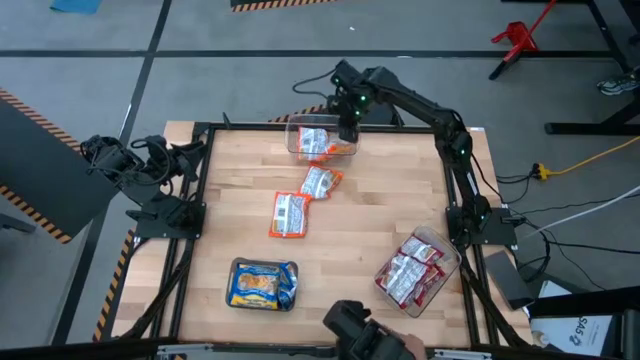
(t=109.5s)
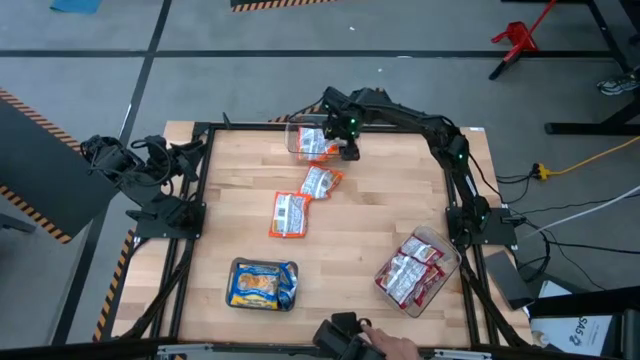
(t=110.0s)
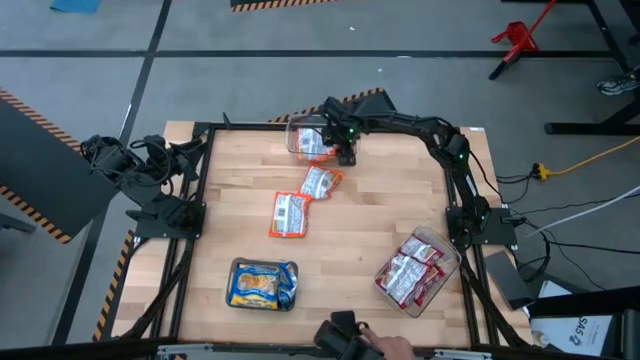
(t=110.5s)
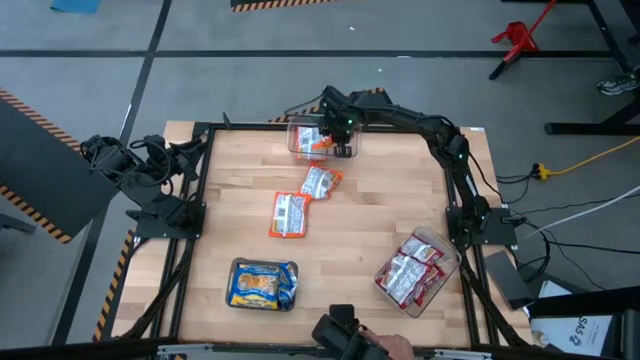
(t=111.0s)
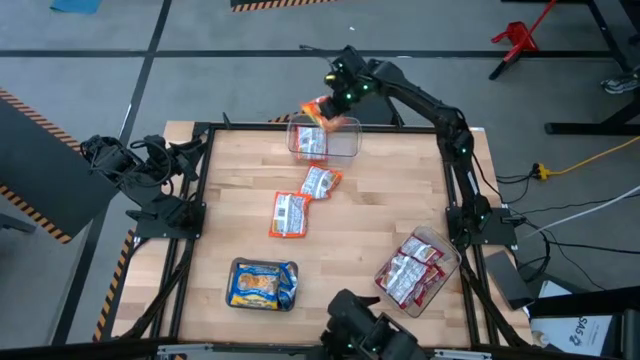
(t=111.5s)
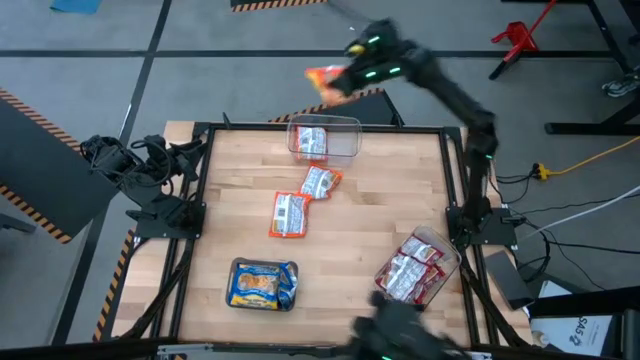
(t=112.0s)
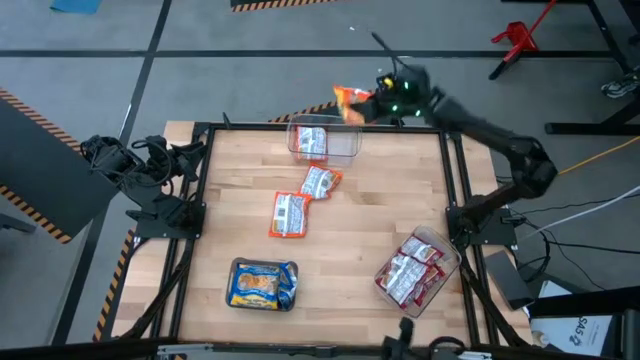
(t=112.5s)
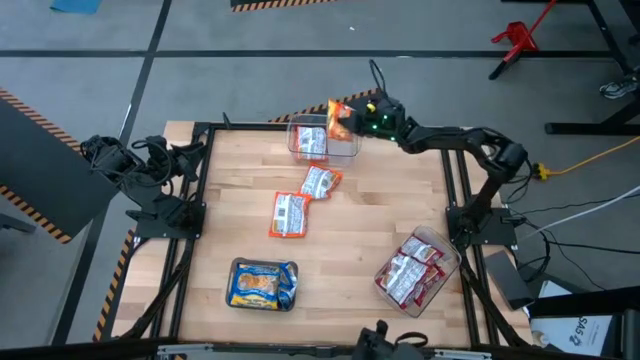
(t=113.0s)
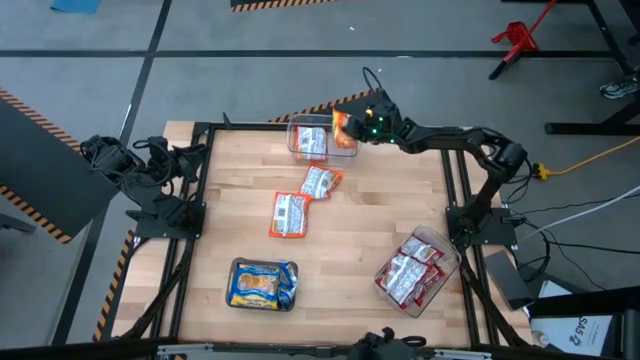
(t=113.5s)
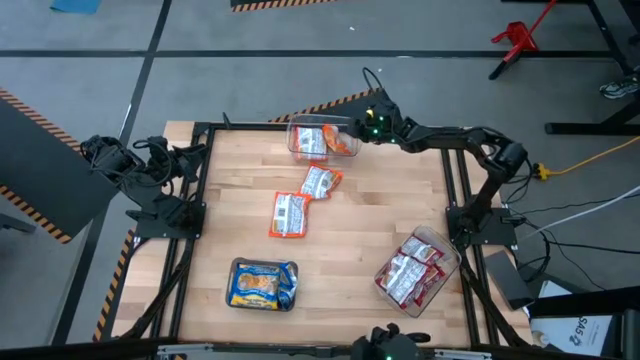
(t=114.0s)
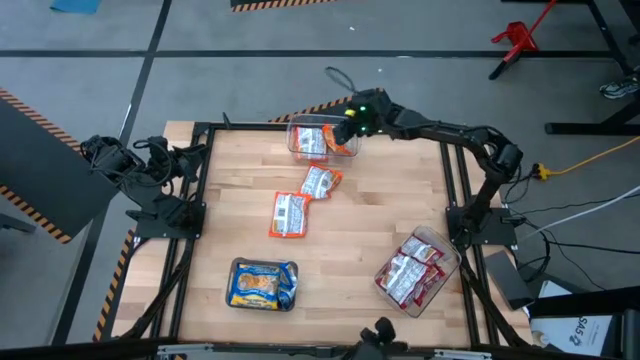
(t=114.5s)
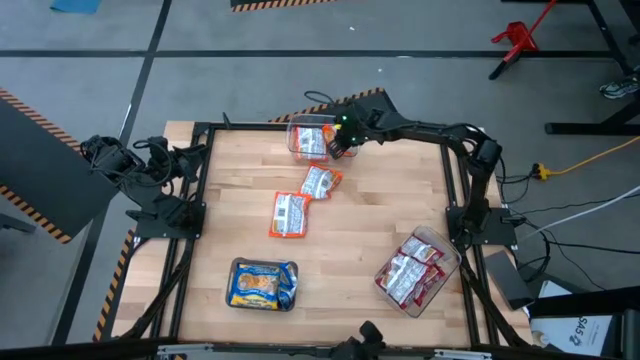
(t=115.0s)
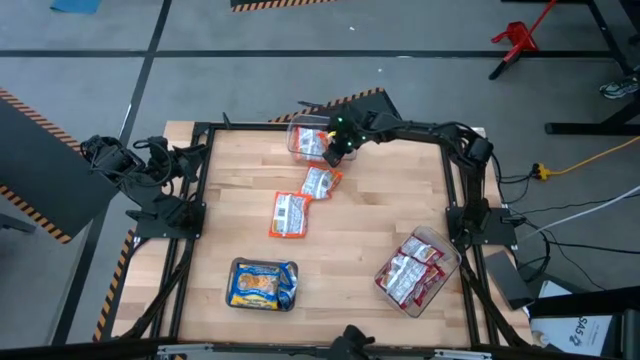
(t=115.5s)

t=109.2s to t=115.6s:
Task: Sort Maruchan noodles
Adjust the orange noodle pack in the top transparent bin

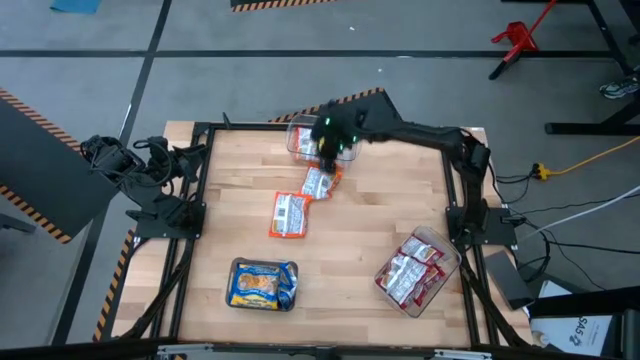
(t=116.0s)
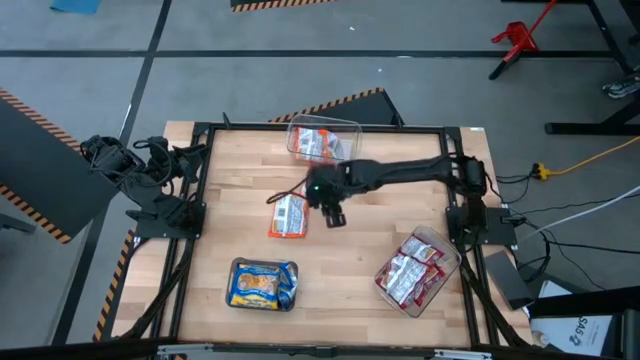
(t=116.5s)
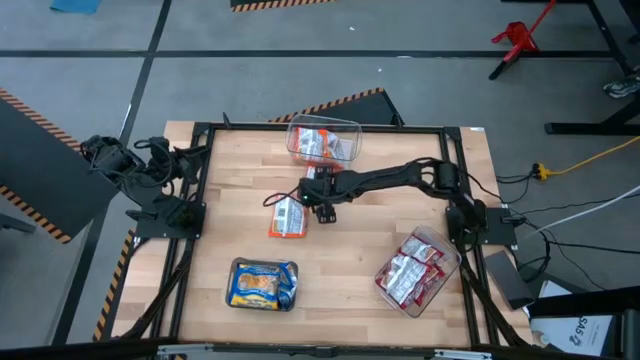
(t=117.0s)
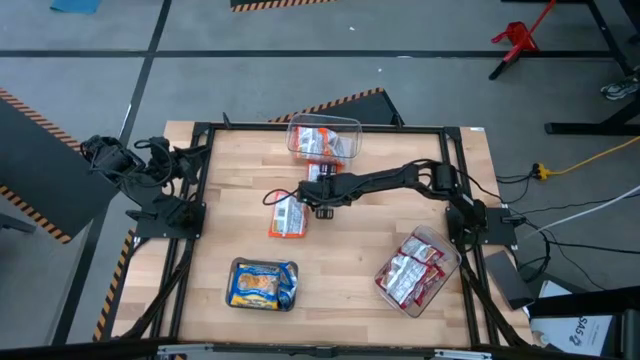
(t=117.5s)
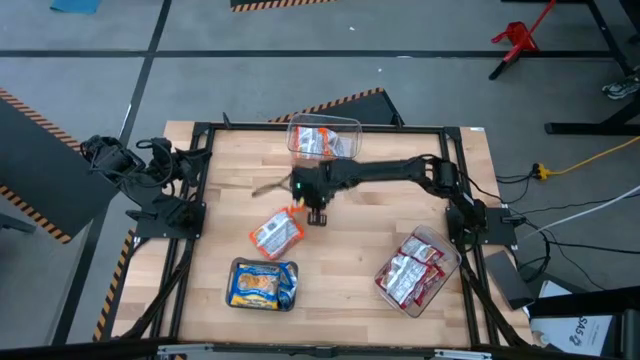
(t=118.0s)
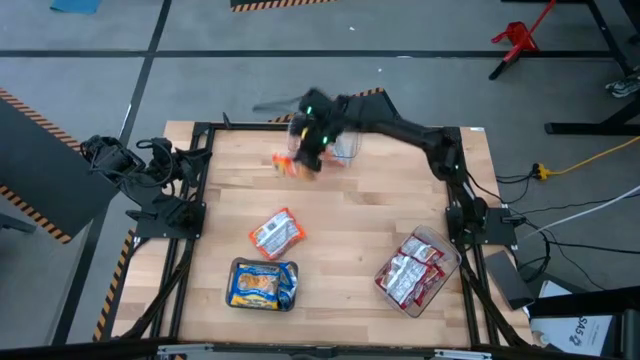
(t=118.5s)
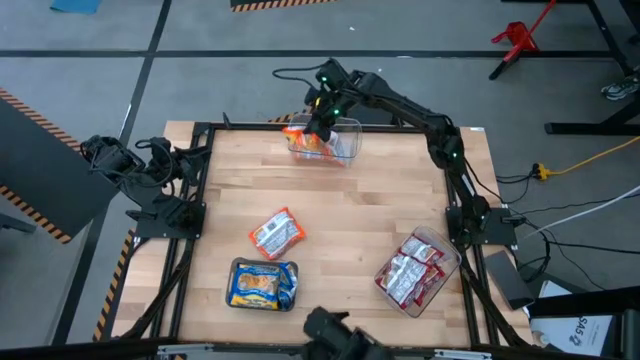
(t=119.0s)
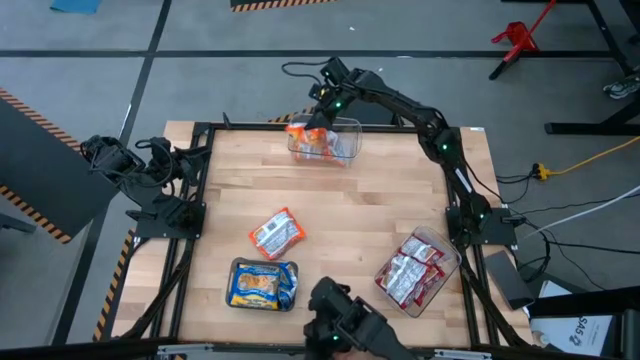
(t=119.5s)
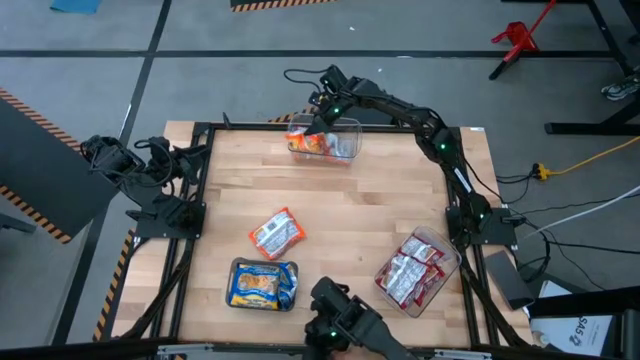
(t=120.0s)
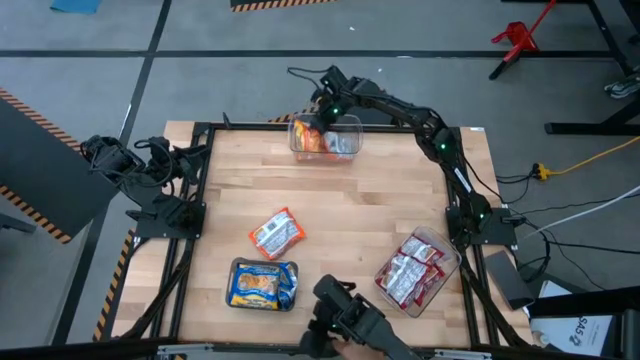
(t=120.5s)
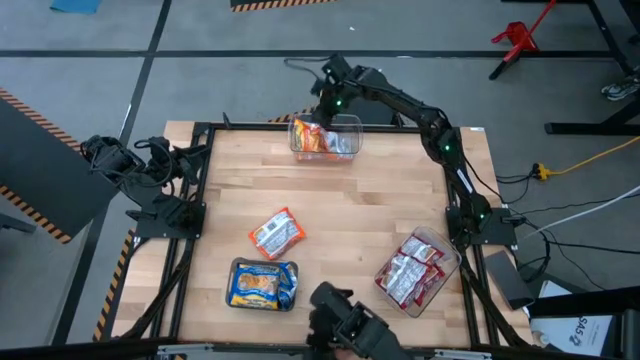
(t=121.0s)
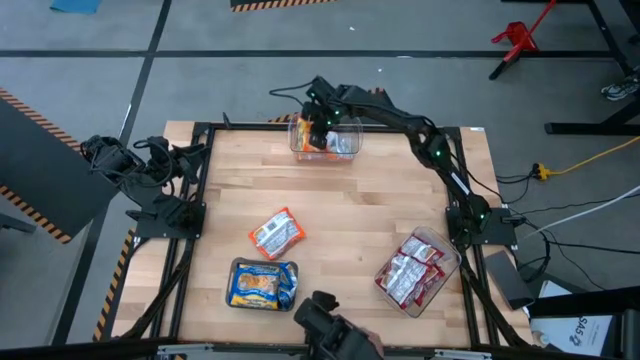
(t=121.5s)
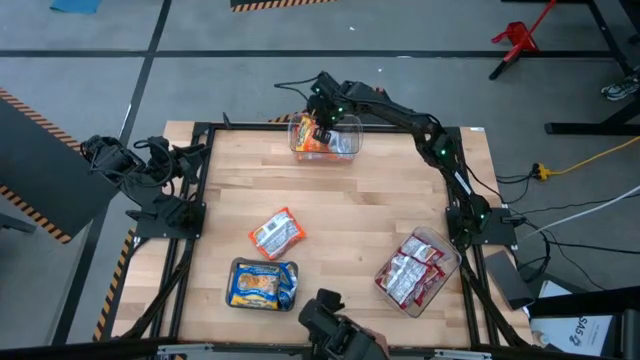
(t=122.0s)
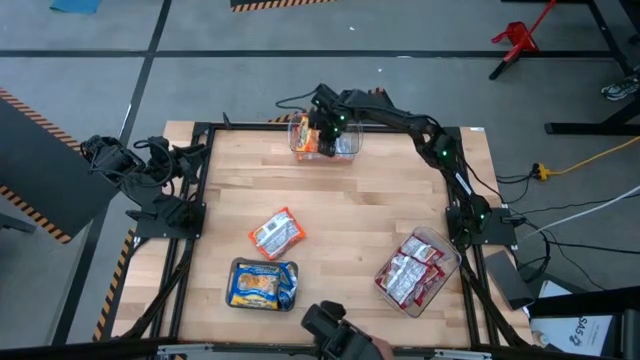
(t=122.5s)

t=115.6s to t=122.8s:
Put the orange noodle pack into the top transparent bin

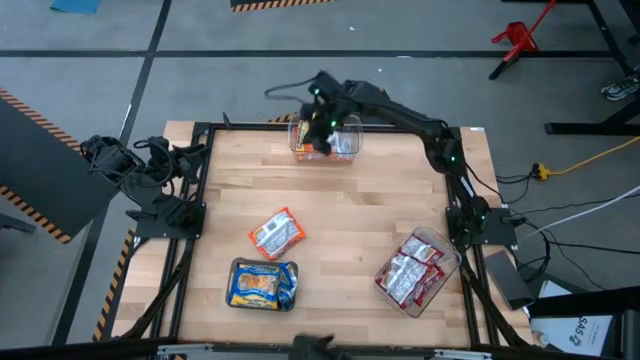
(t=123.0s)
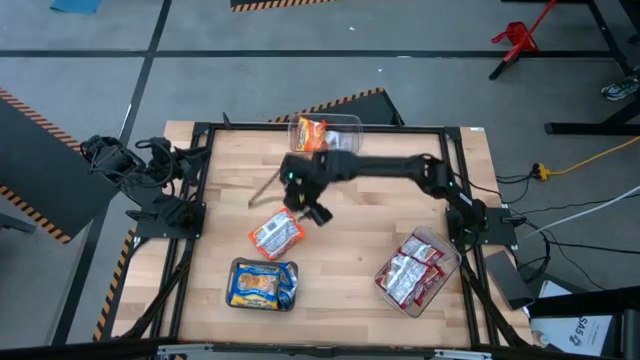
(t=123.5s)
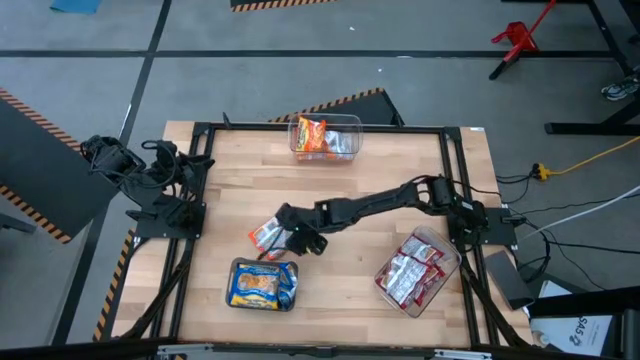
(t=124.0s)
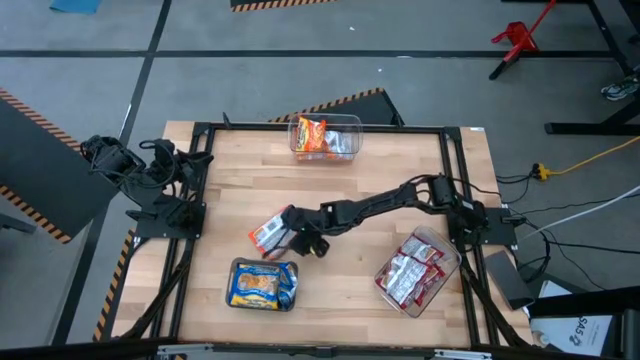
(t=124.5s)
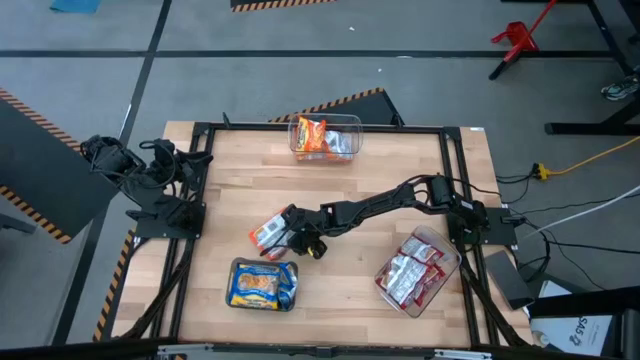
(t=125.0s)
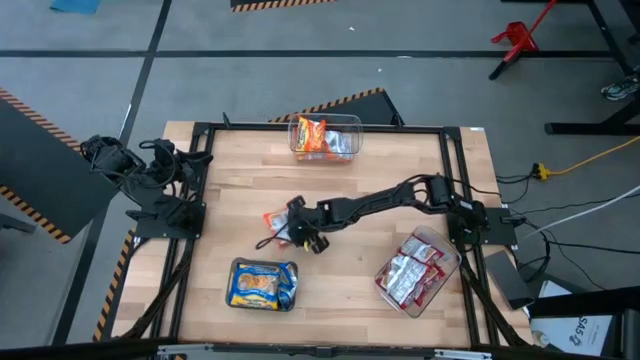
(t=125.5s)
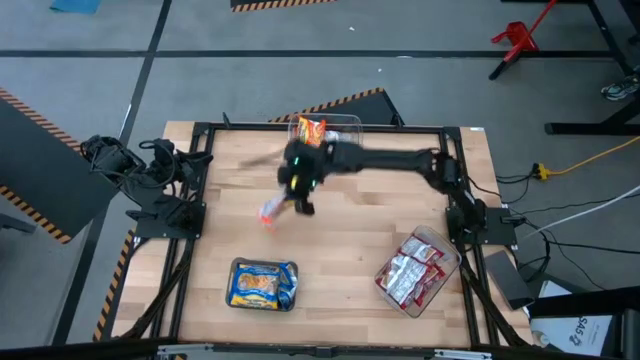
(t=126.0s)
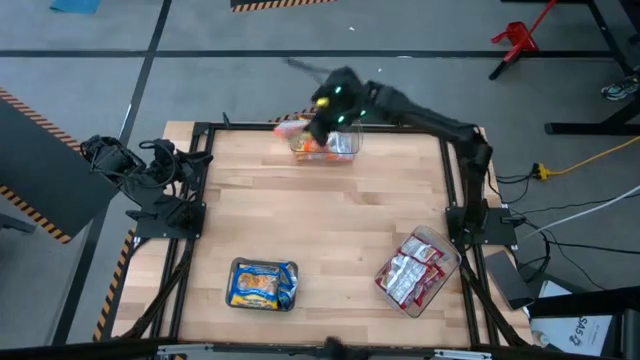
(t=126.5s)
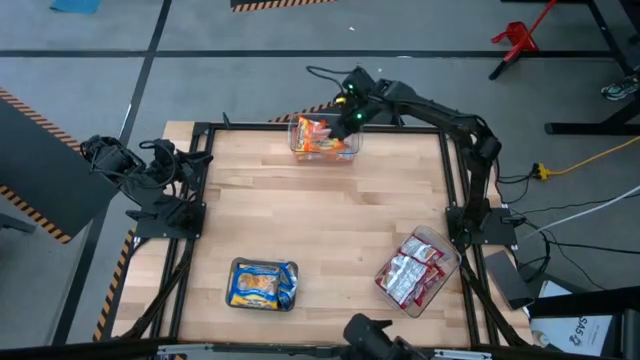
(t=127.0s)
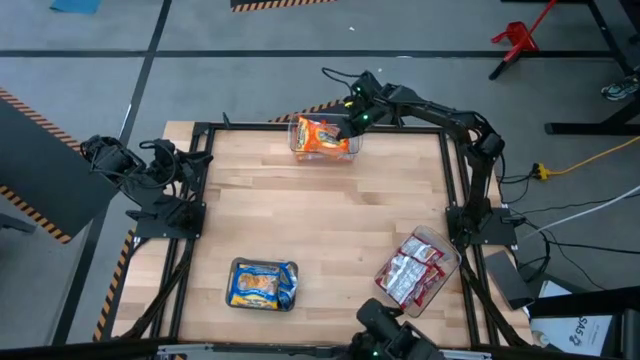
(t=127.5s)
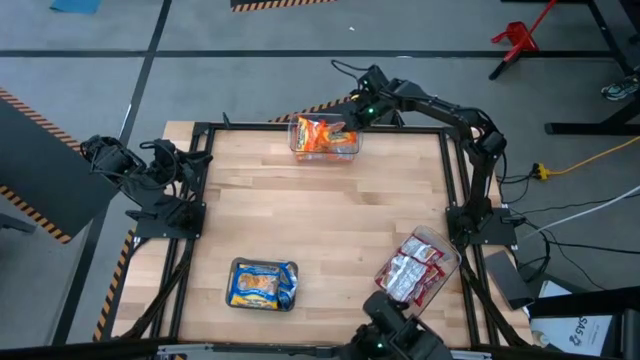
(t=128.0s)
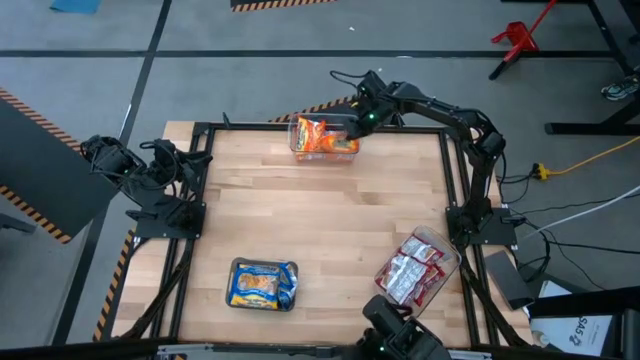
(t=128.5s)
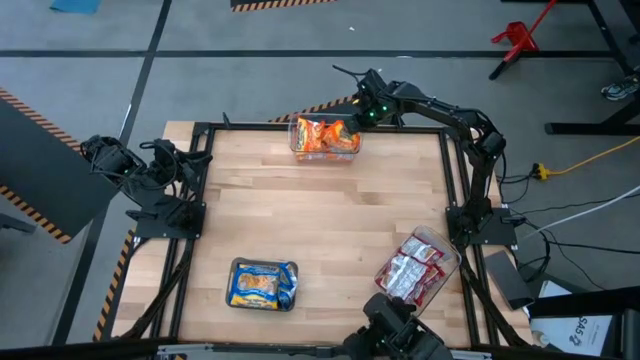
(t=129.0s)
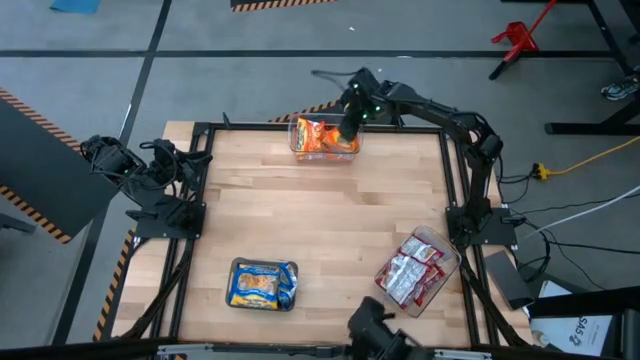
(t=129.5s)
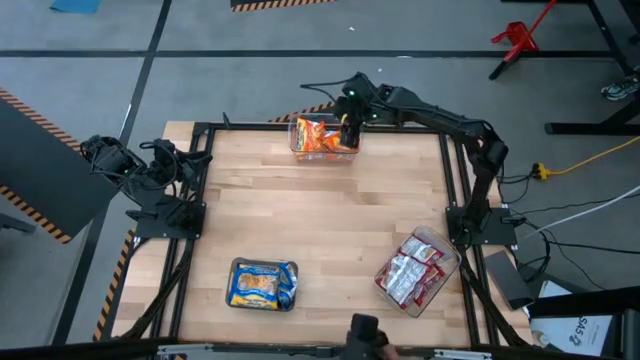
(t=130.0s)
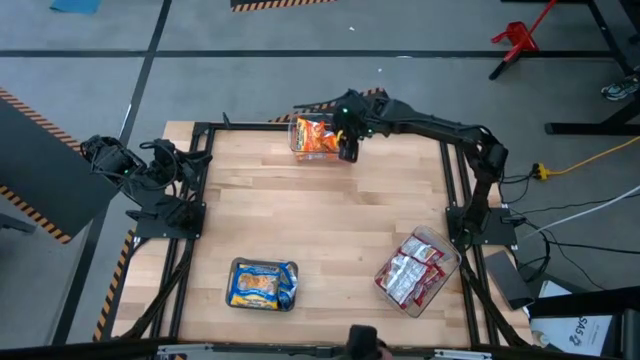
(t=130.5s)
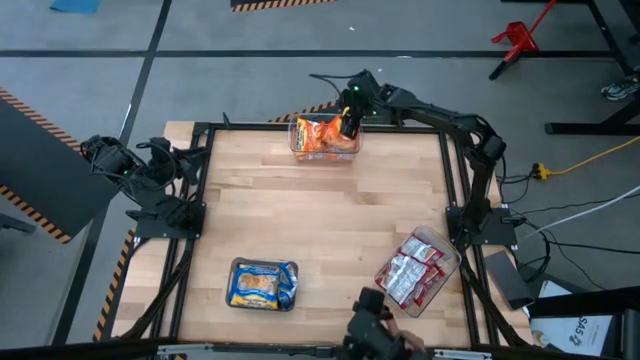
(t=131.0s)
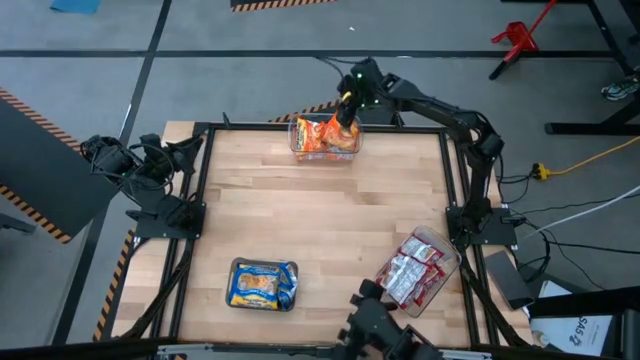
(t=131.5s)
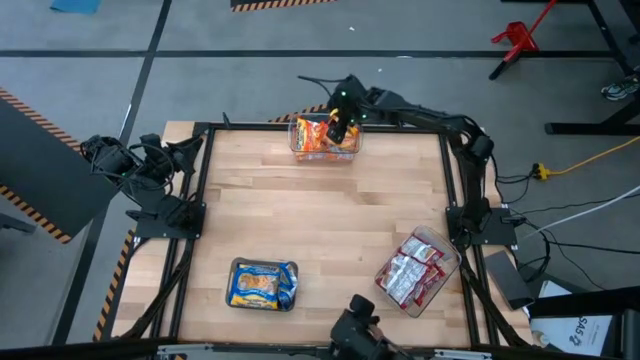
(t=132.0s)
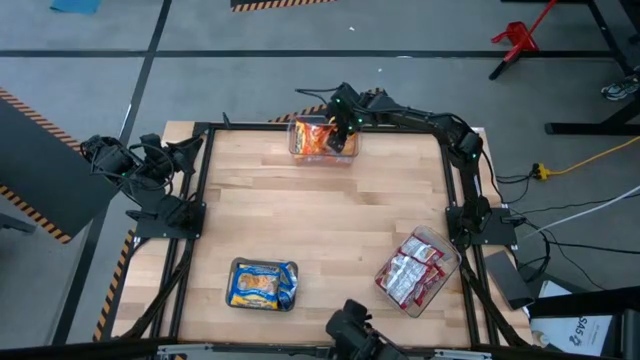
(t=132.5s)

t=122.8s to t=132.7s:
Put the orange noodle pack into the top transparent bin
